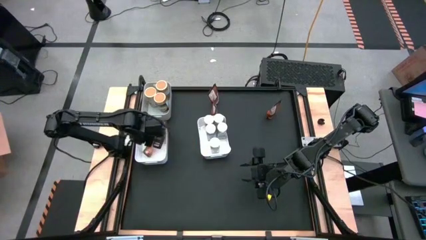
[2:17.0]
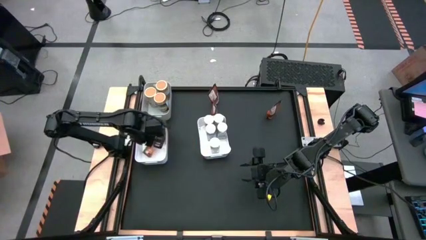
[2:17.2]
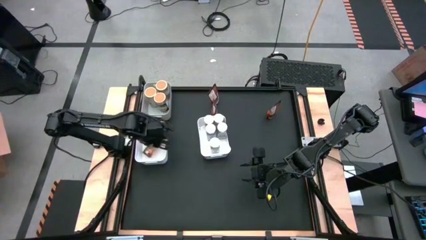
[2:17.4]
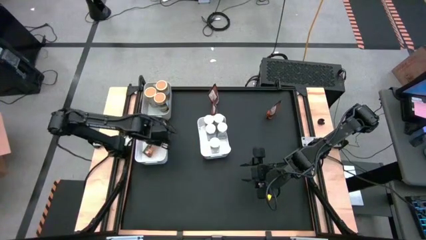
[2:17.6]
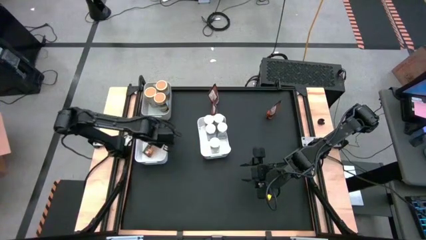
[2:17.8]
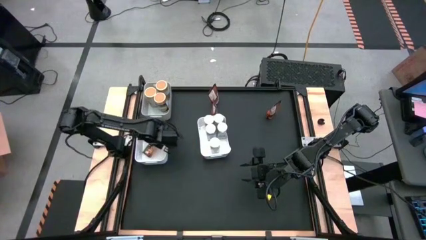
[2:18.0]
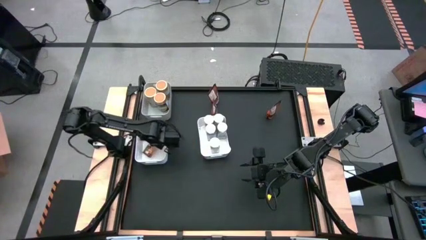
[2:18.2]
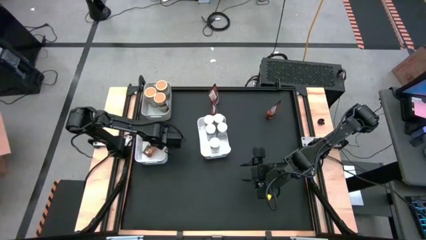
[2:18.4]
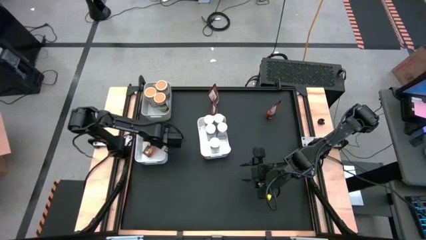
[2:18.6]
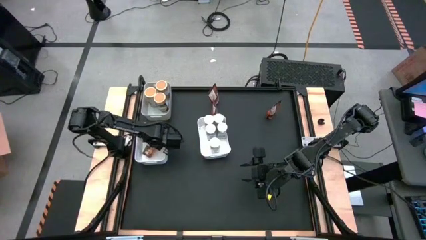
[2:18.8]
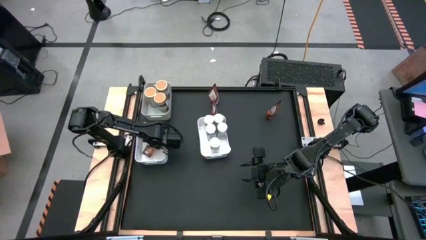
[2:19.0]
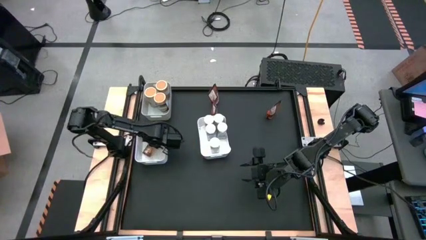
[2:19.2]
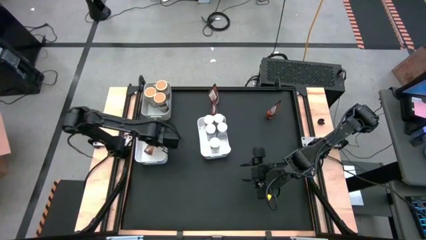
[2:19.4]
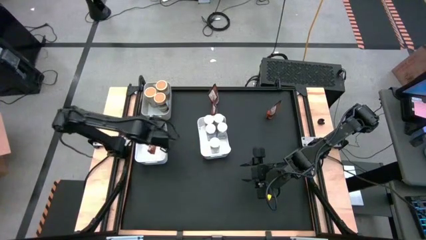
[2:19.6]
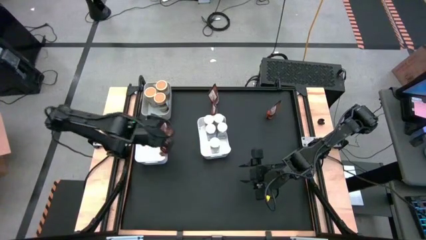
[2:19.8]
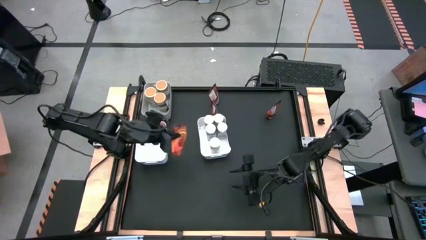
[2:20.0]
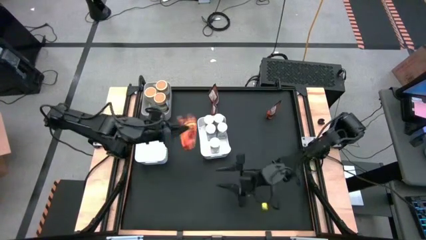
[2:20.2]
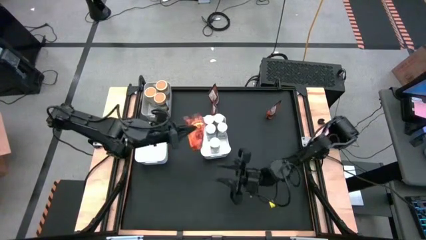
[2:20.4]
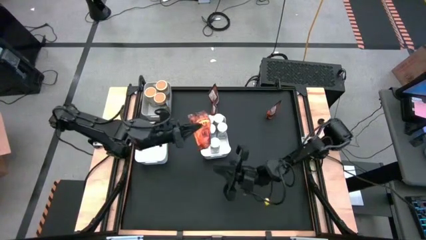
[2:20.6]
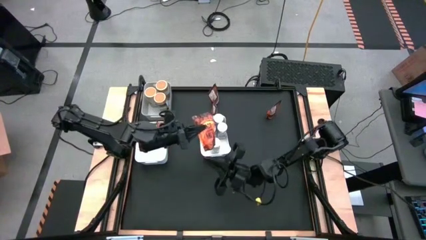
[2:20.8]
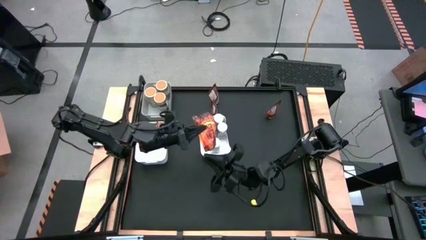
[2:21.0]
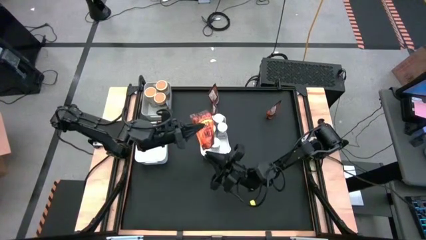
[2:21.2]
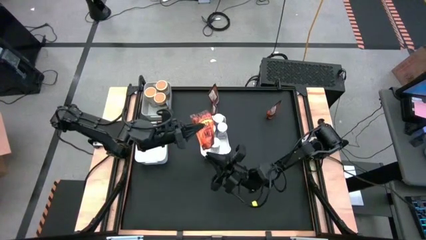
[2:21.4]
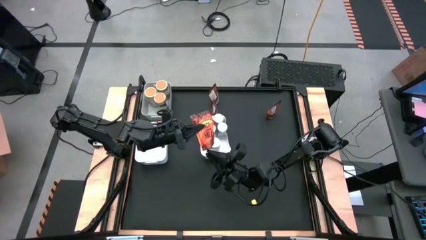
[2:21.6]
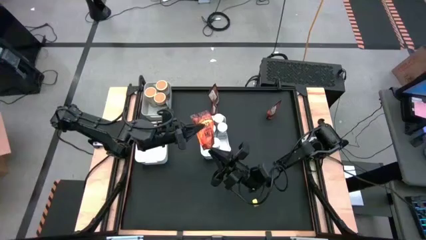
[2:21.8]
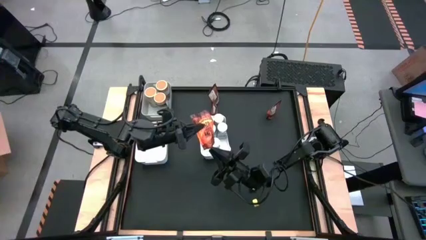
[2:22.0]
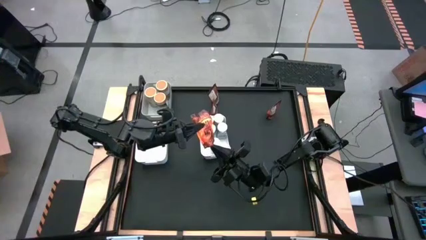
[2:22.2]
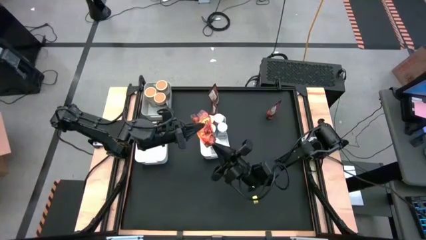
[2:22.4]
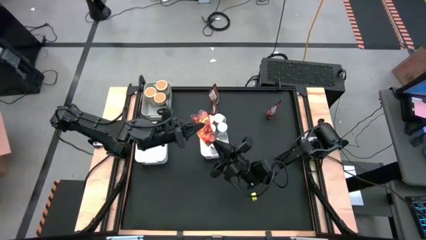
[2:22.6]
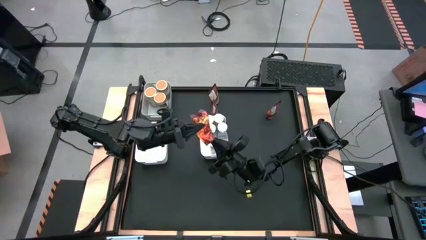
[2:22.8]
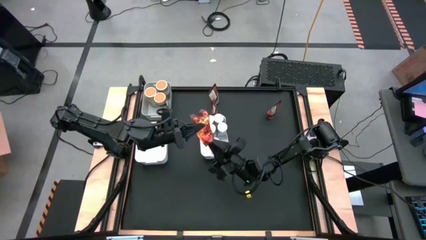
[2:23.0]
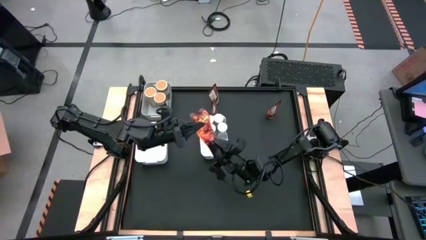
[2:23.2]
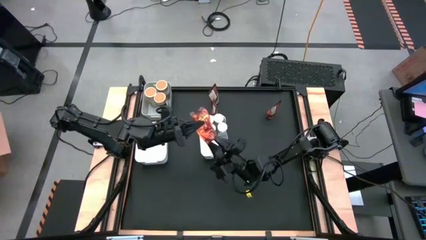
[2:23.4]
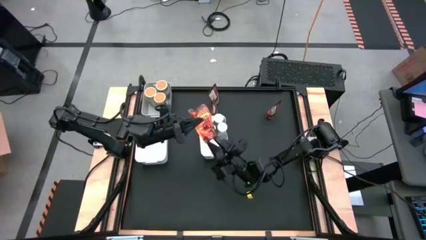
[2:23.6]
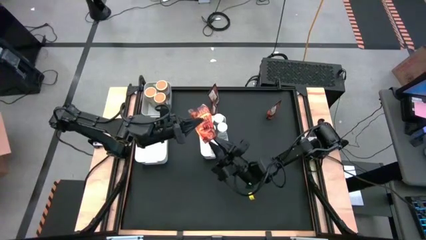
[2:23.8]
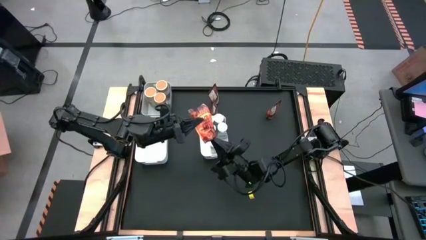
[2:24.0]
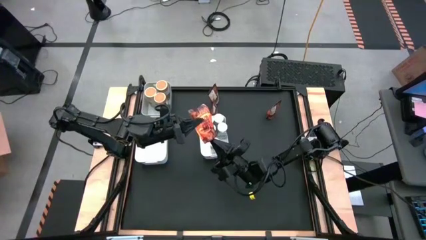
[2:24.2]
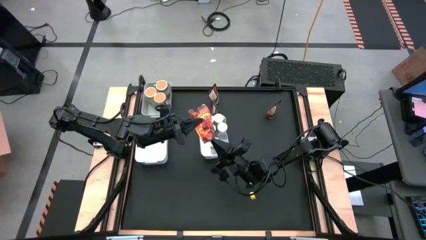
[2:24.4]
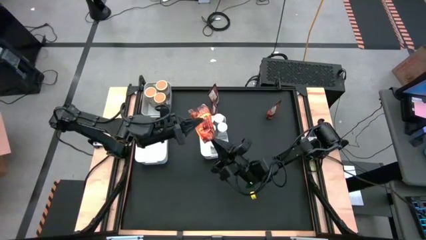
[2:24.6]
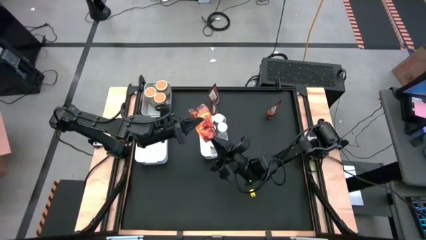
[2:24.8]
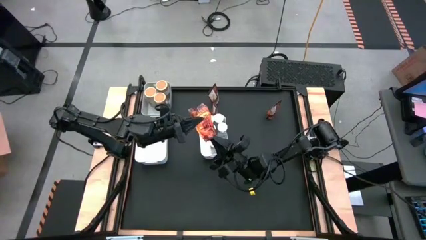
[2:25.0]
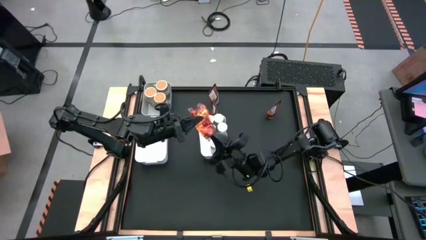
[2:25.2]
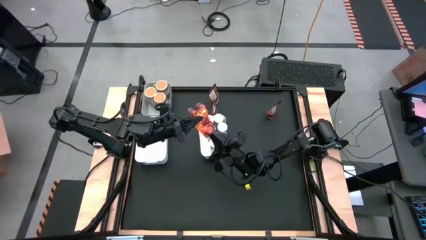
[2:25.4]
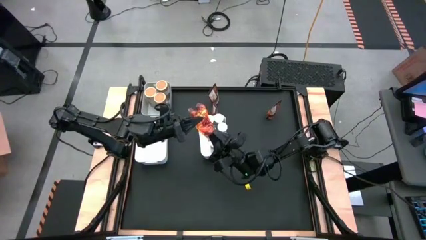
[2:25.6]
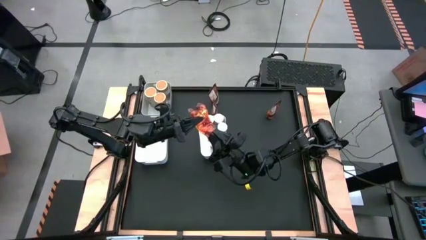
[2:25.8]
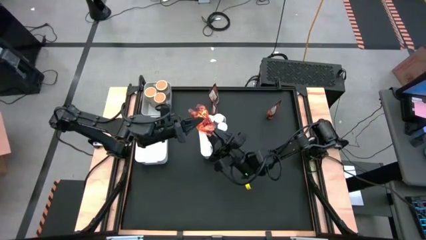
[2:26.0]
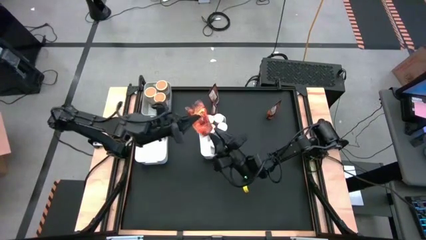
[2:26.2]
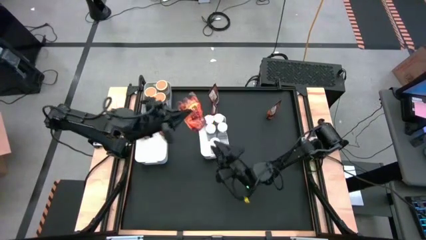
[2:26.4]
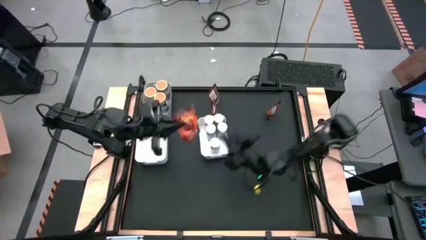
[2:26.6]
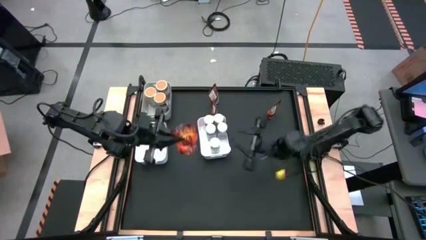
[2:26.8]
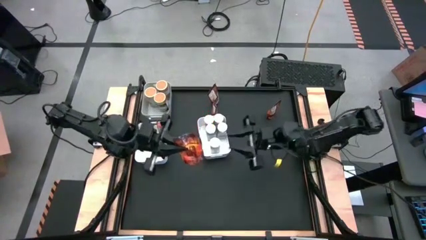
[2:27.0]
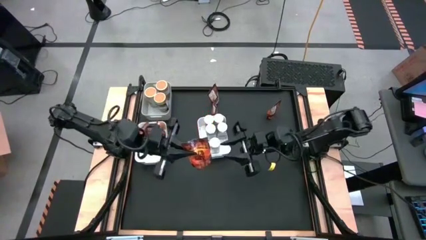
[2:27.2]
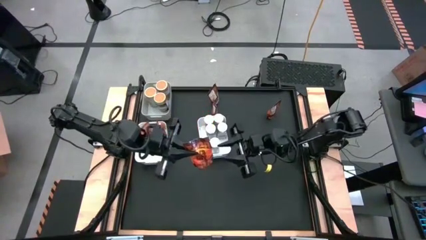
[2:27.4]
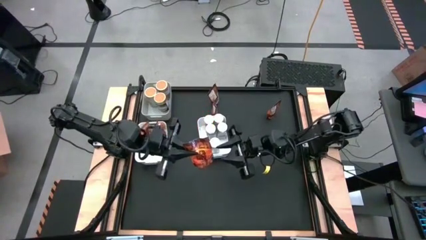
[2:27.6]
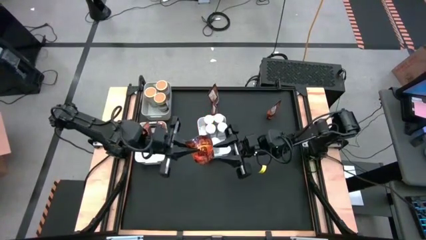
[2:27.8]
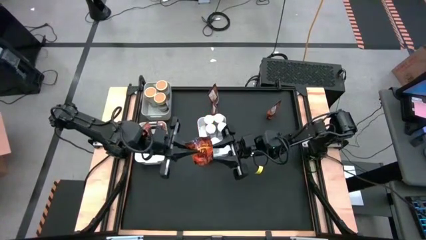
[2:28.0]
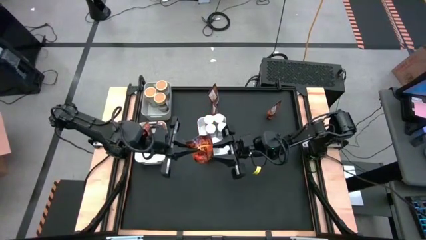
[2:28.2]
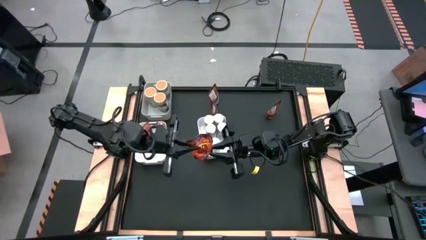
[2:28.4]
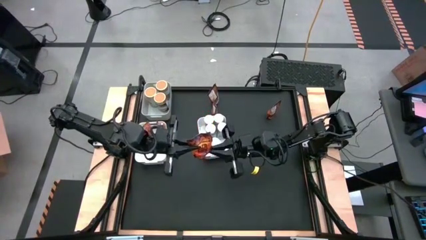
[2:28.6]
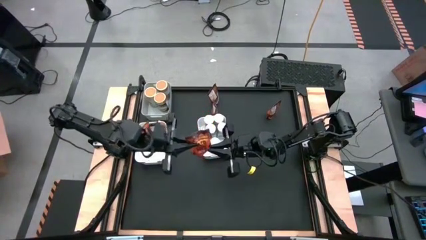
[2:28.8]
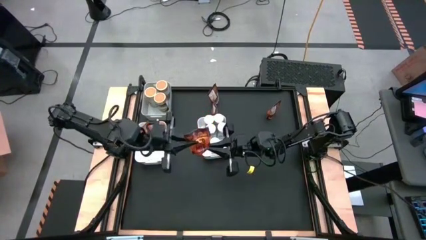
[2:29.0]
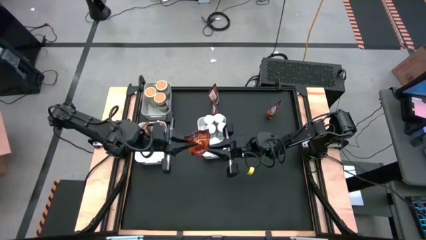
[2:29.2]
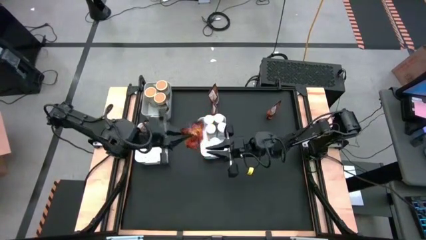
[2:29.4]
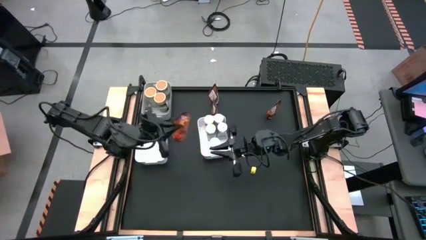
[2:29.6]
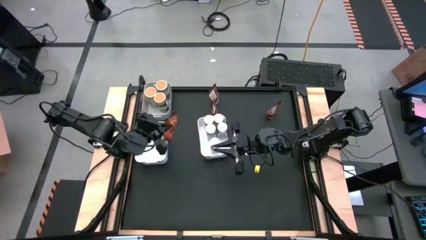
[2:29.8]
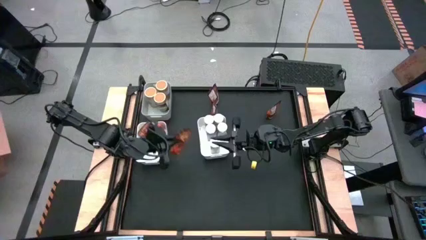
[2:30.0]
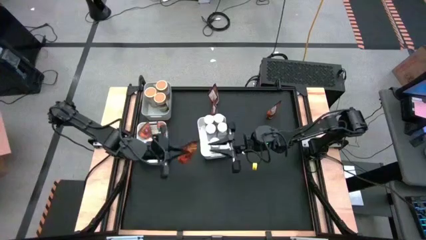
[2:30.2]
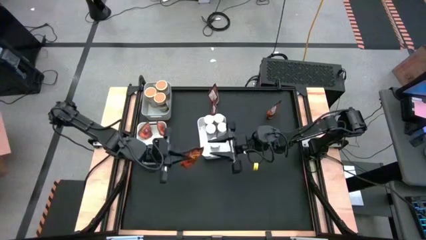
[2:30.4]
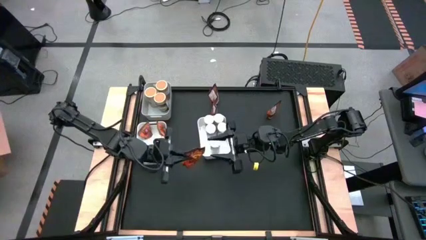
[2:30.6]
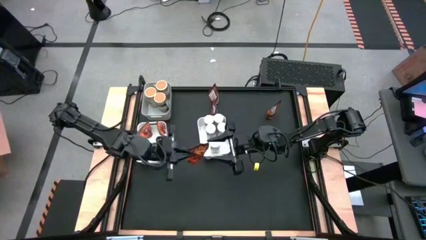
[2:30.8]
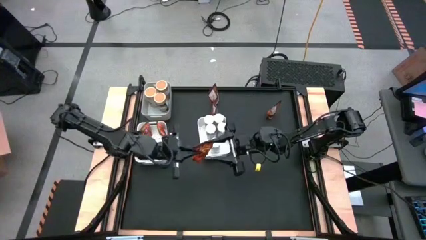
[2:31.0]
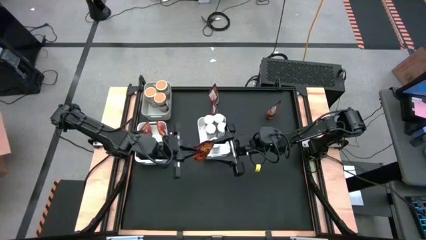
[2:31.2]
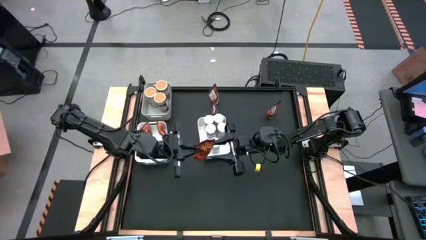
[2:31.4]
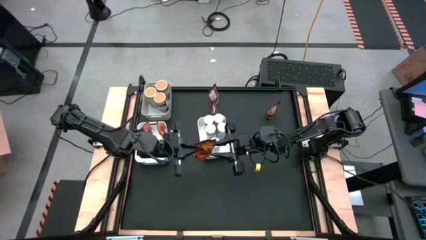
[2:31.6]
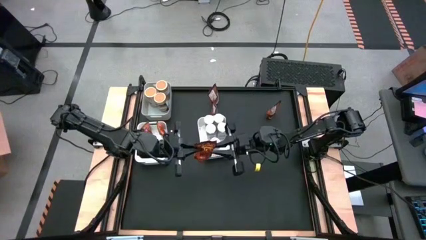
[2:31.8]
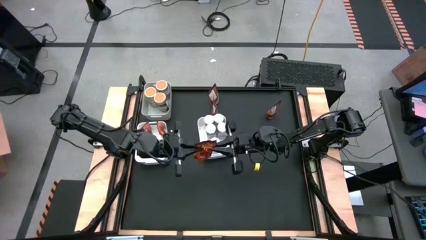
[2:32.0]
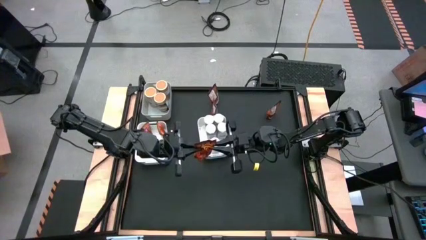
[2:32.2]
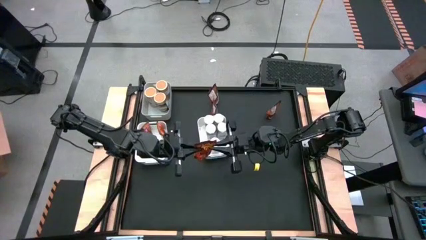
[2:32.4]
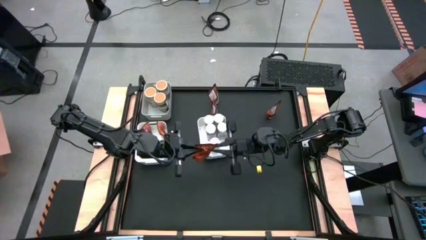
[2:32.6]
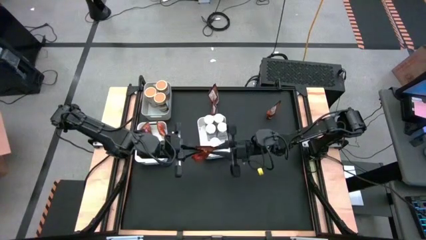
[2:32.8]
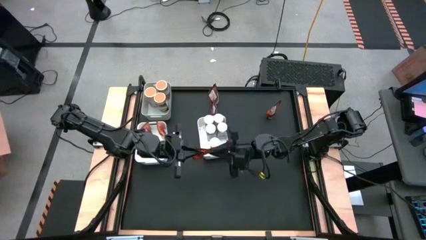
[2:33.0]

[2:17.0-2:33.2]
Task: Sort spices by type
Put the orange seasoning pack into the left white bin
